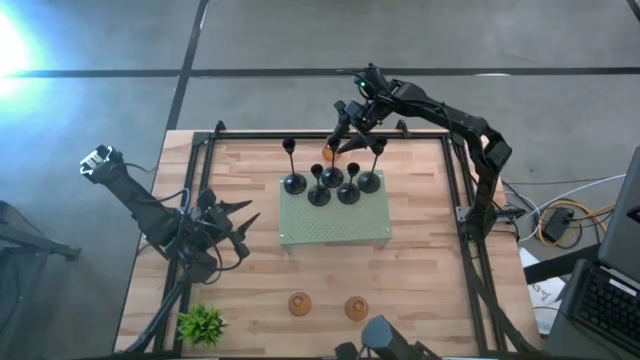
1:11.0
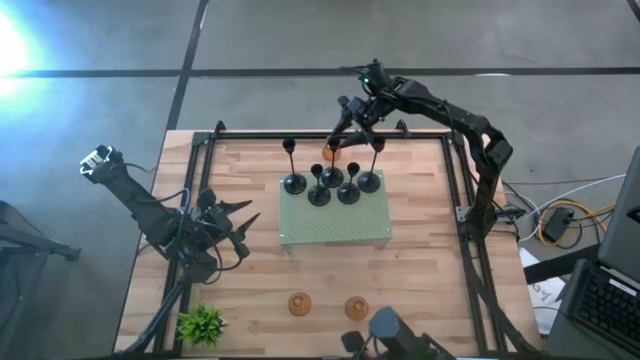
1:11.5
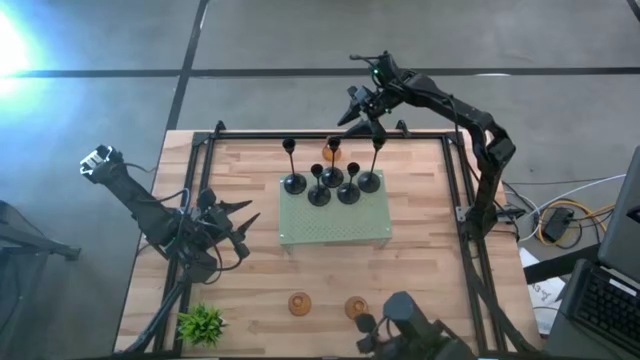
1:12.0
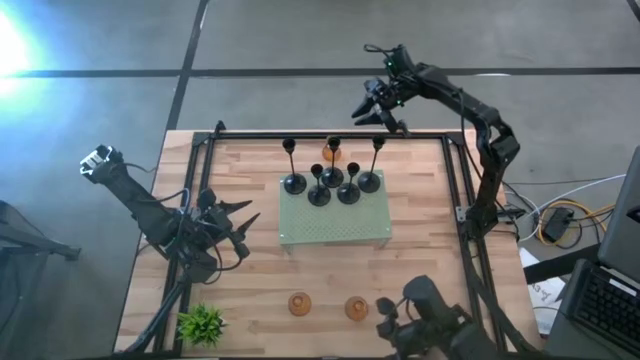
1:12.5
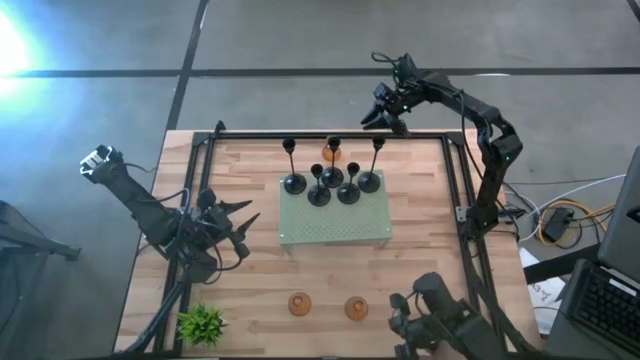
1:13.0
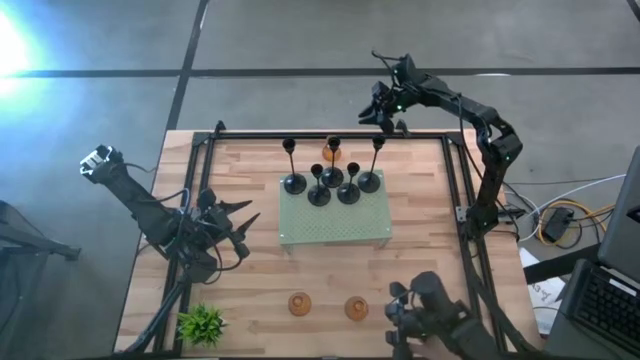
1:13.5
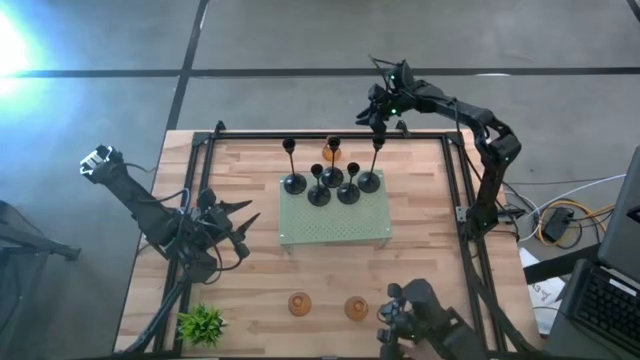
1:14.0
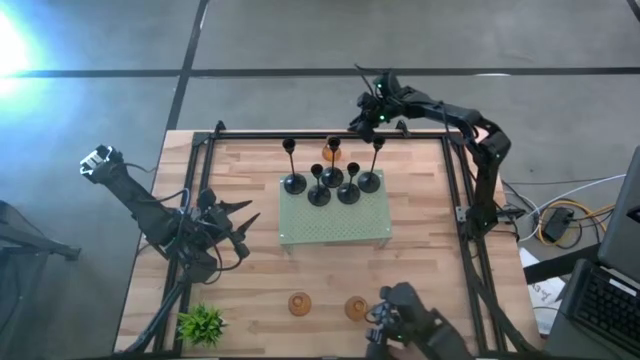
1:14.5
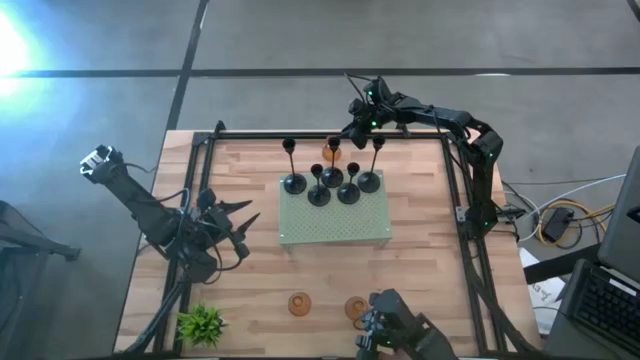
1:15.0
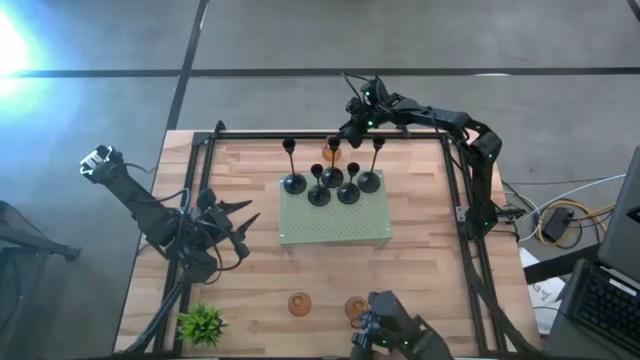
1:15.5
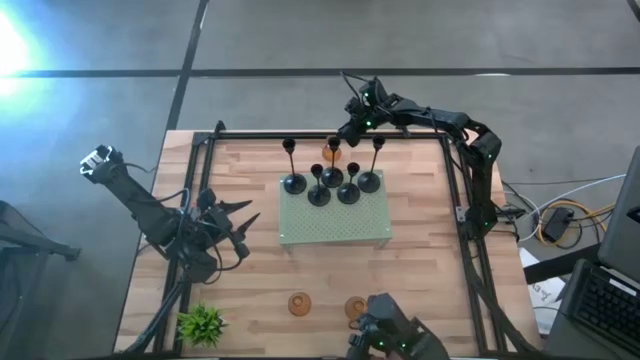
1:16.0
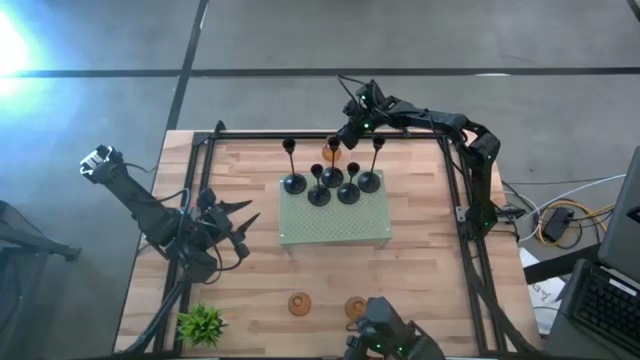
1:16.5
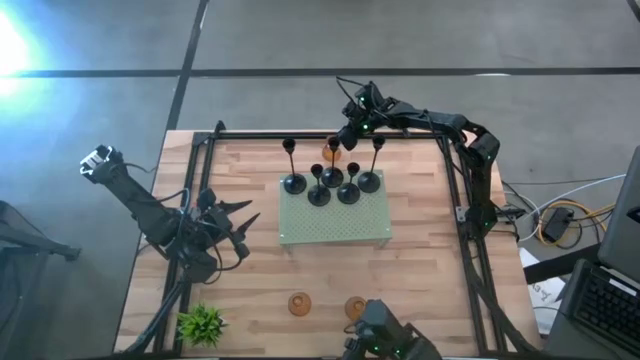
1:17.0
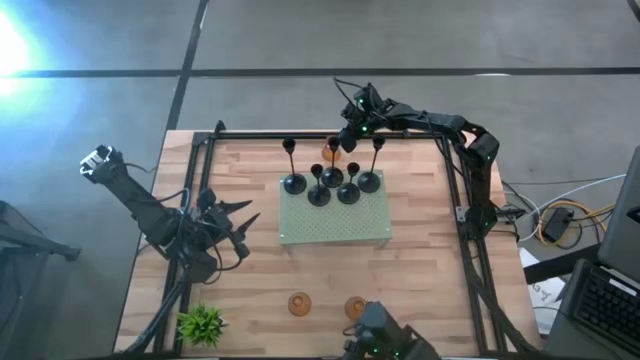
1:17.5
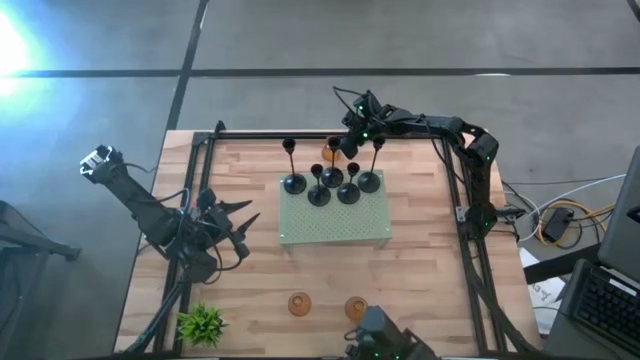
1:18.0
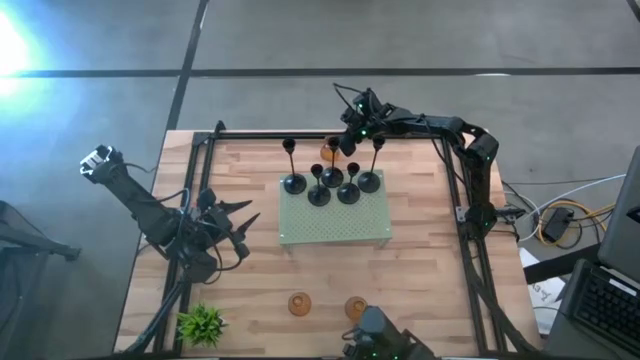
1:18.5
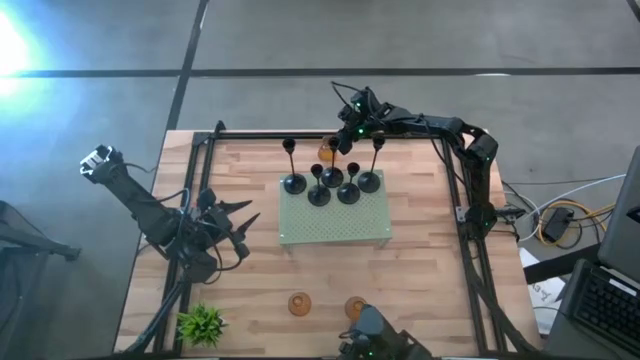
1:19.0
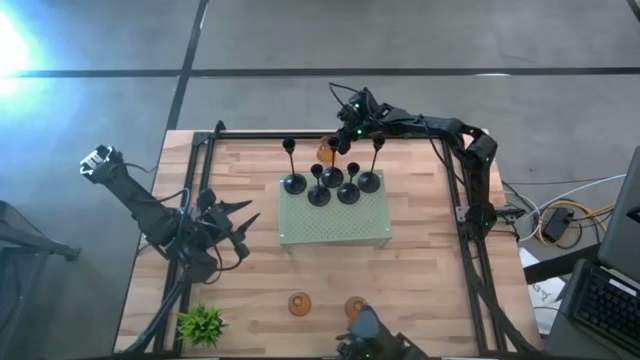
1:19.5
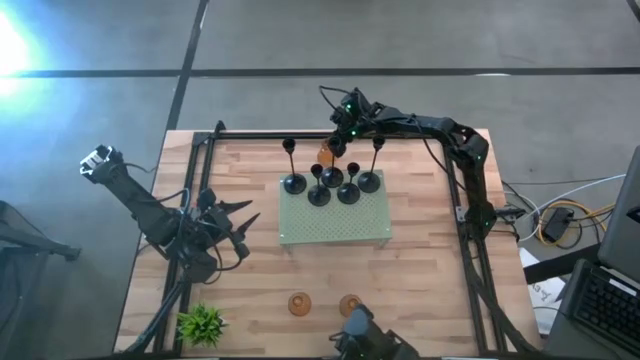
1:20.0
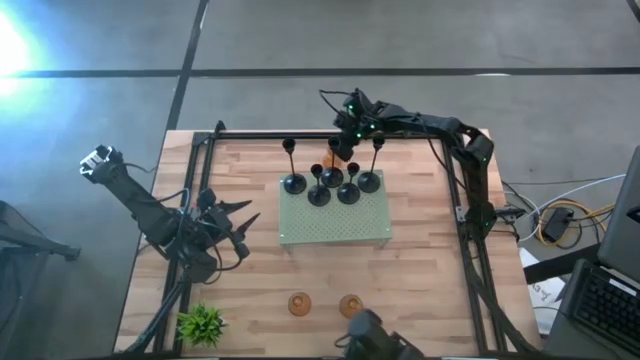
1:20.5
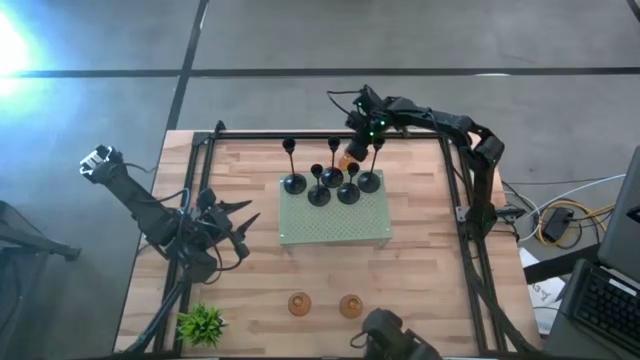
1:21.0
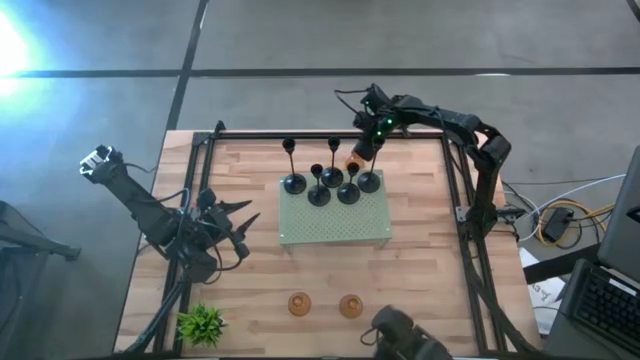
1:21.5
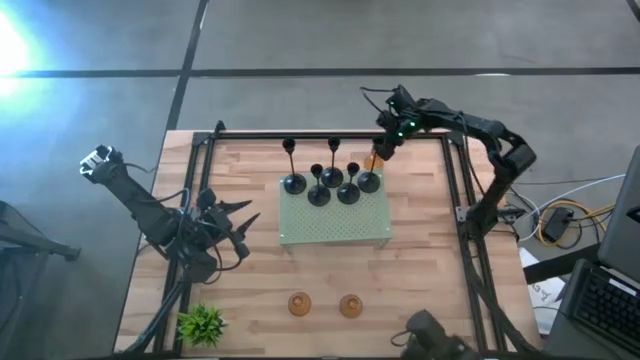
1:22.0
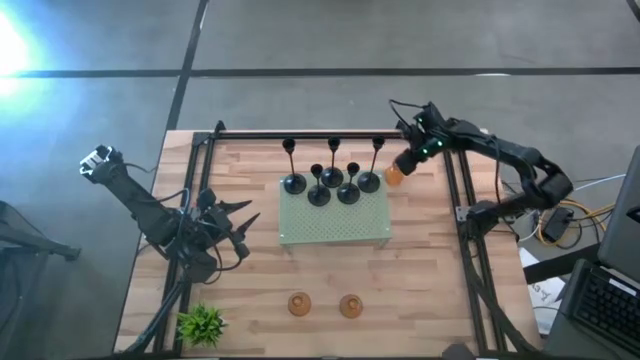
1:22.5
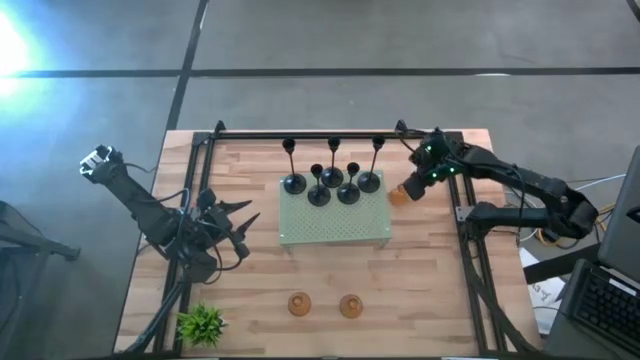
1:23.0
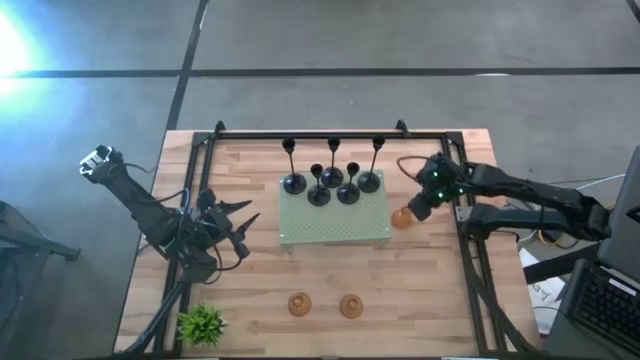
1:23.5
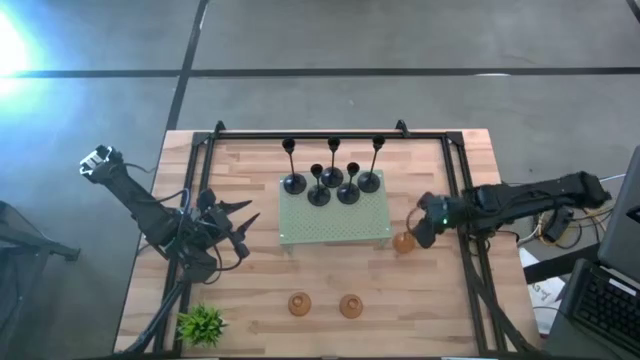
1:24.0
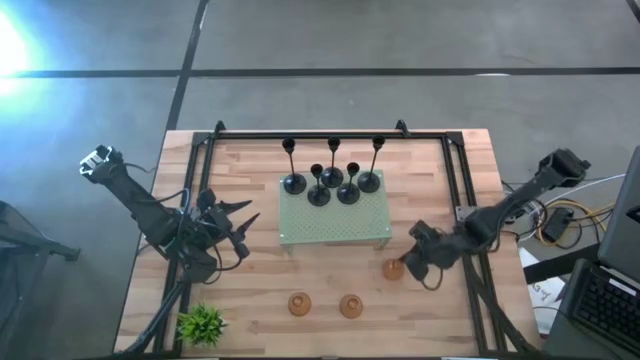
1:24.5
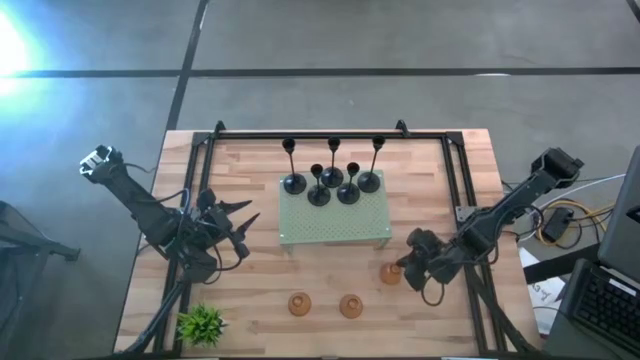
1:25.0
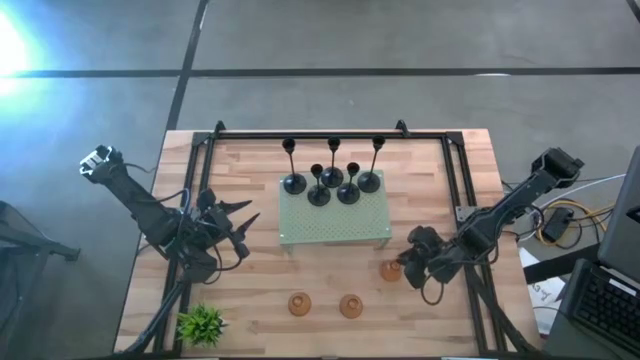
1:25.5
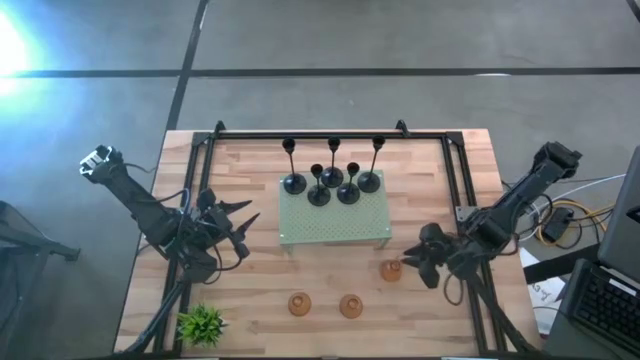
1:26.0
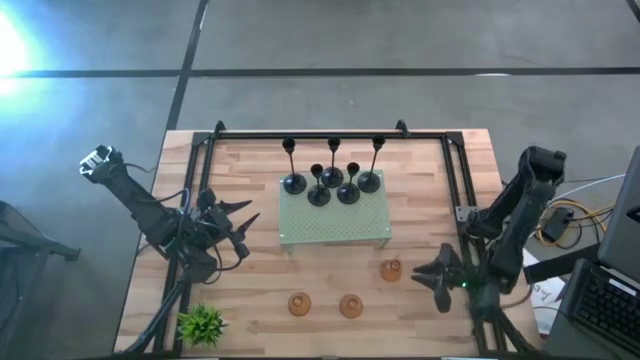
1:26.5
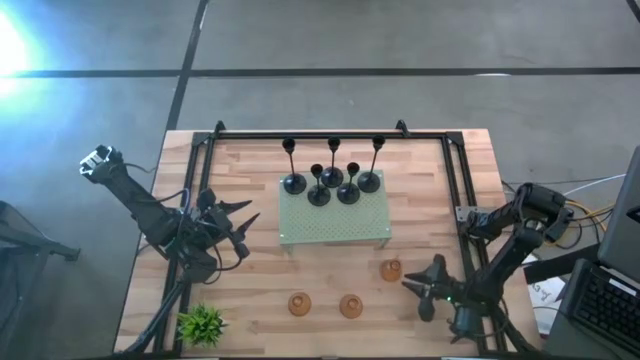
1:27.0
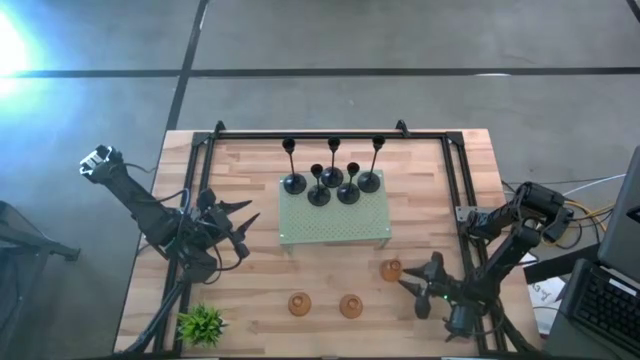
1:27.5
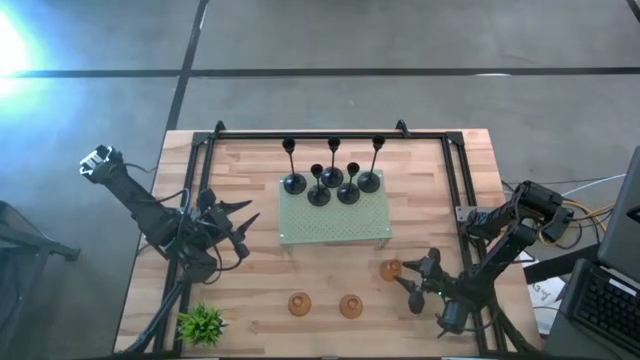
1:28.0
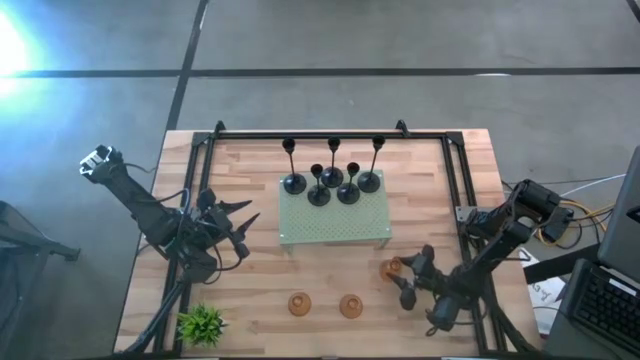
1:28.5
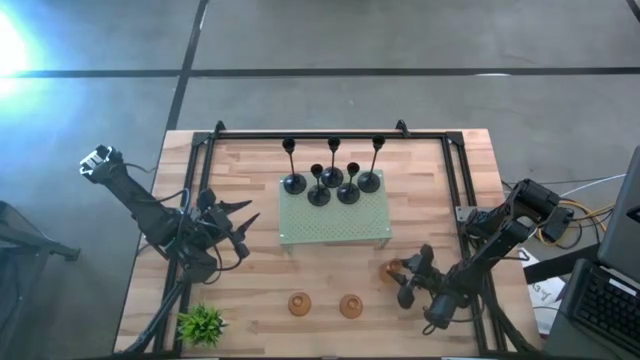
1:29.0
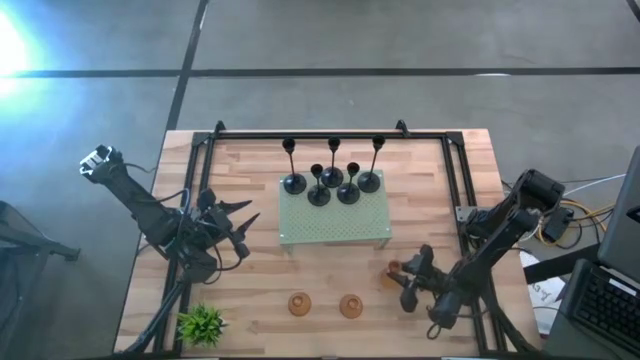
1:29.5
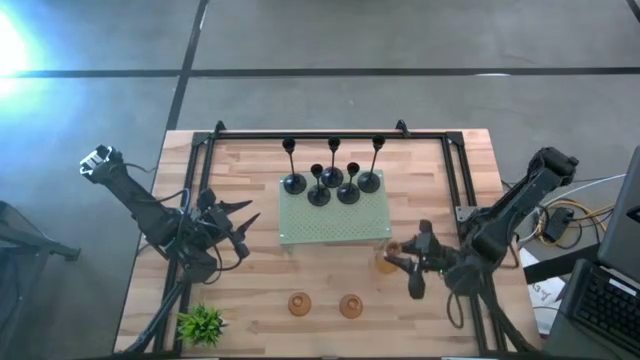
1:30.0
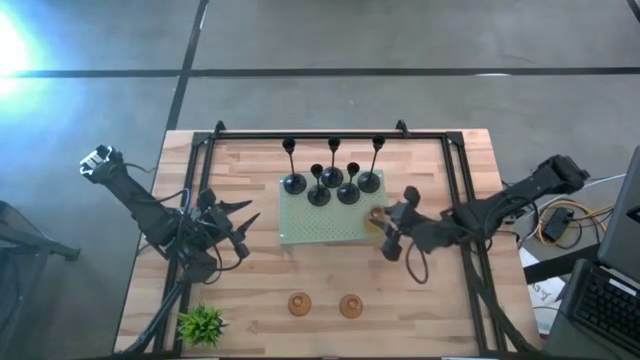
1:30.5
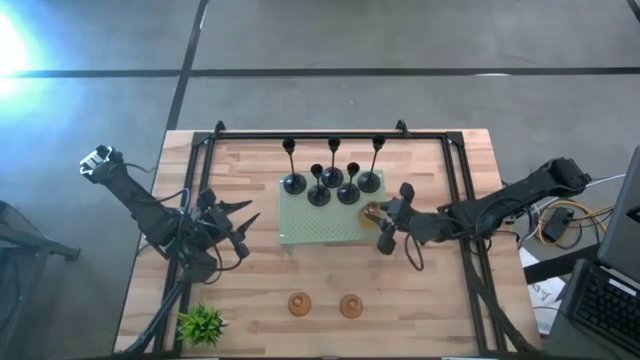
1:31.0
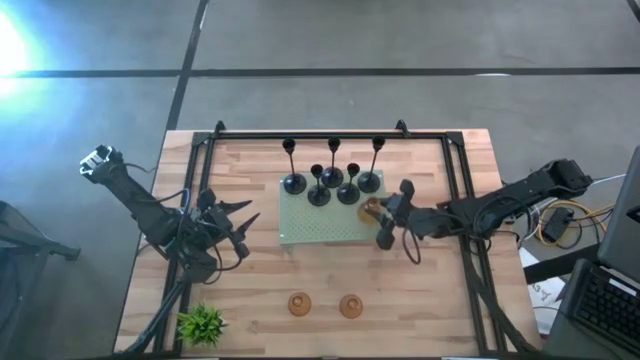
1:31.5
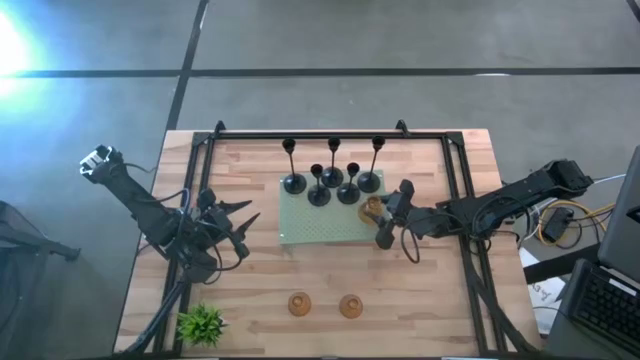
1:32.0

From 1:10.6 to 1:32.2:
Task: Pick & Place candle stick holders
Put the top yellow glass candle holder on the shelf
